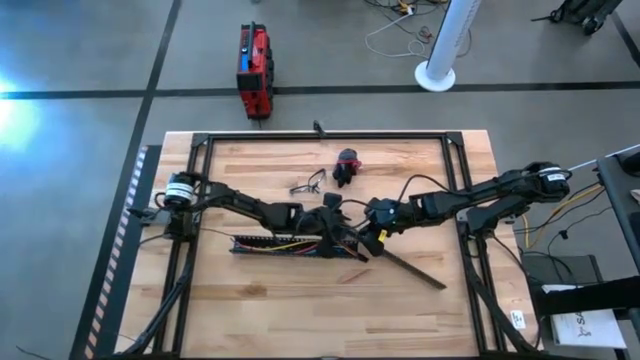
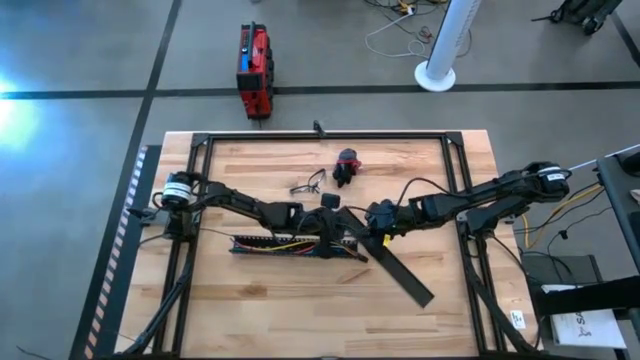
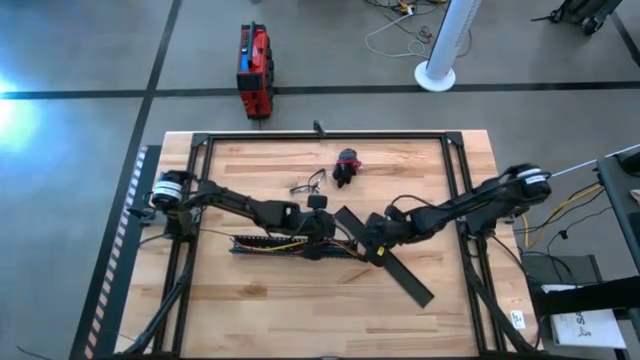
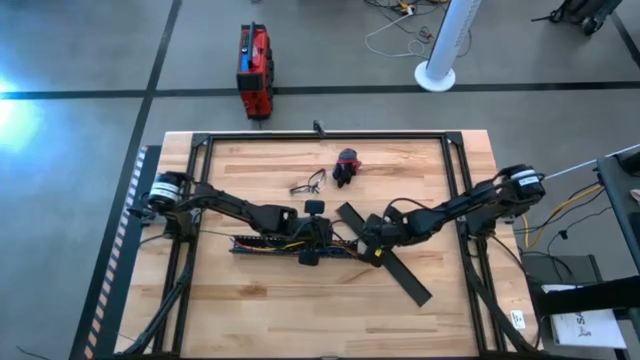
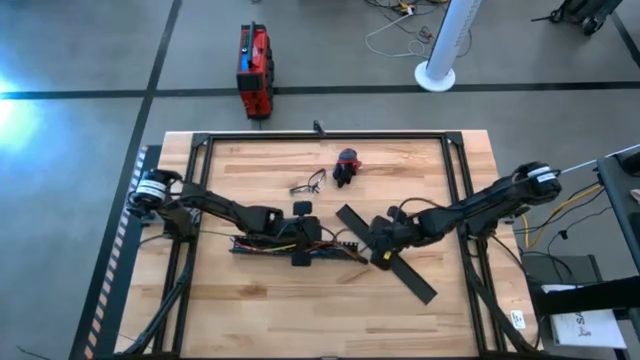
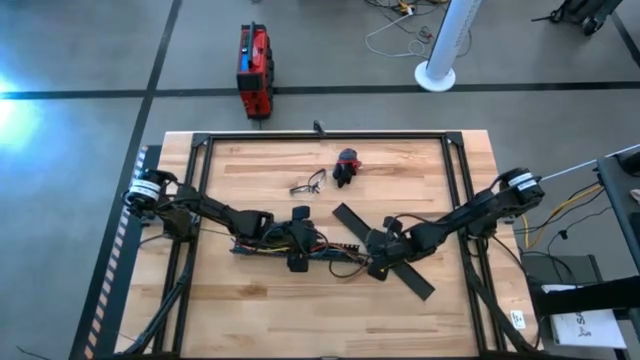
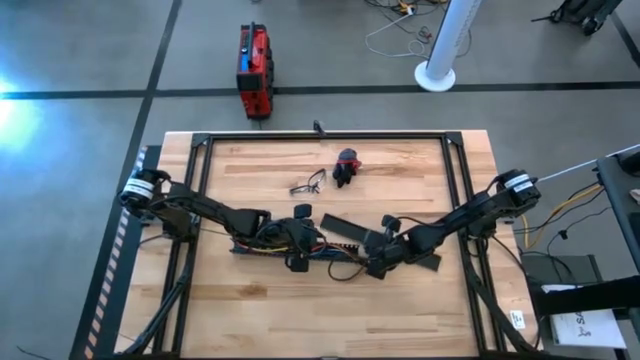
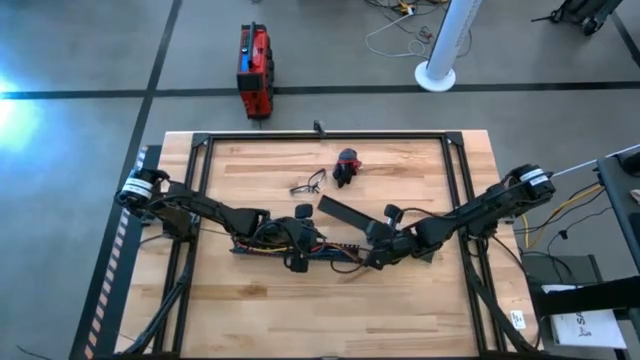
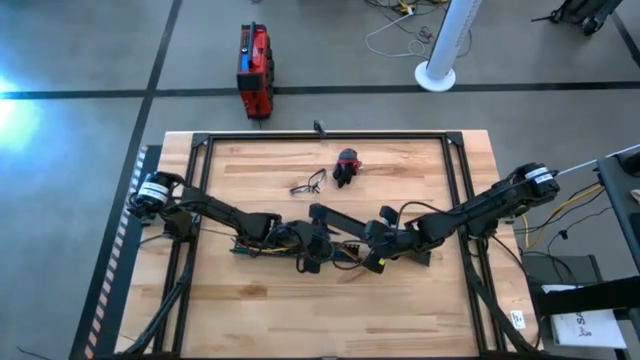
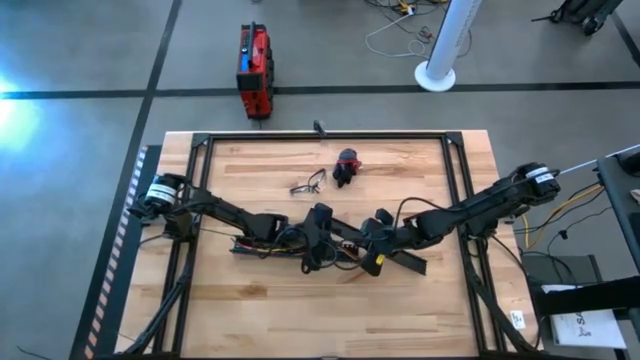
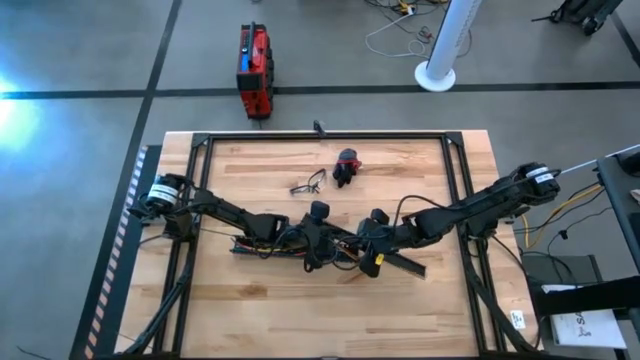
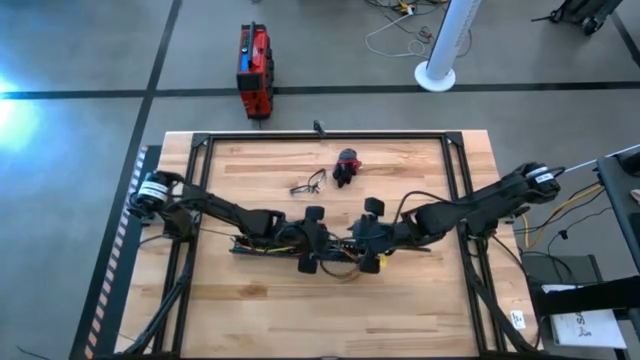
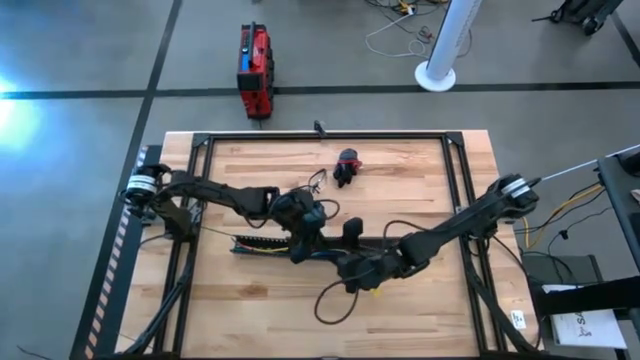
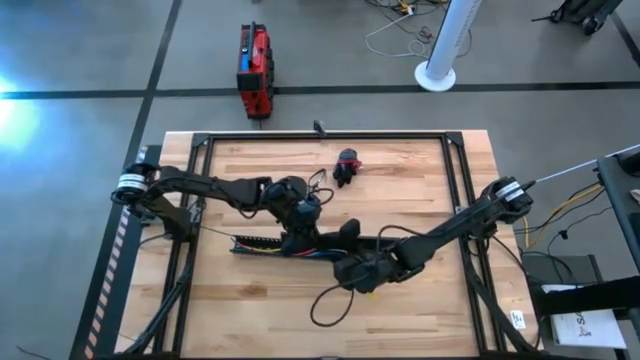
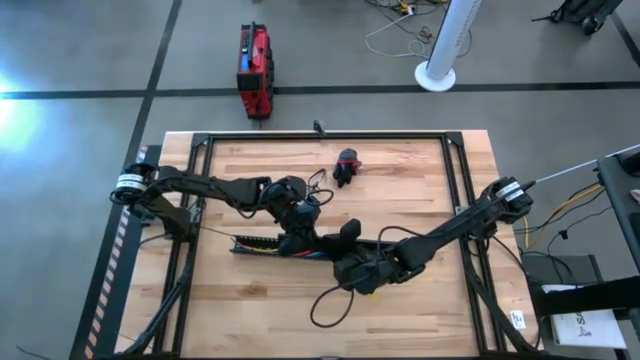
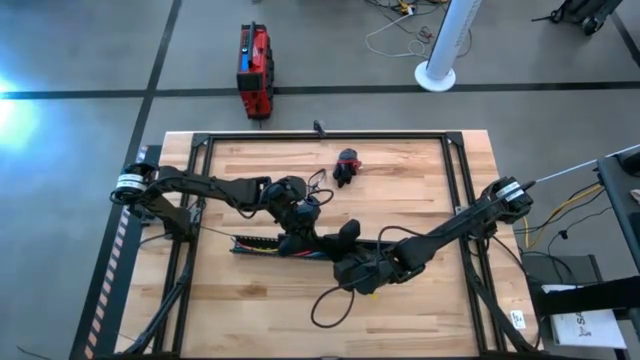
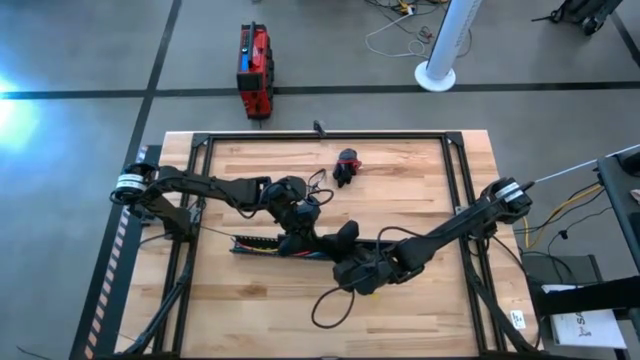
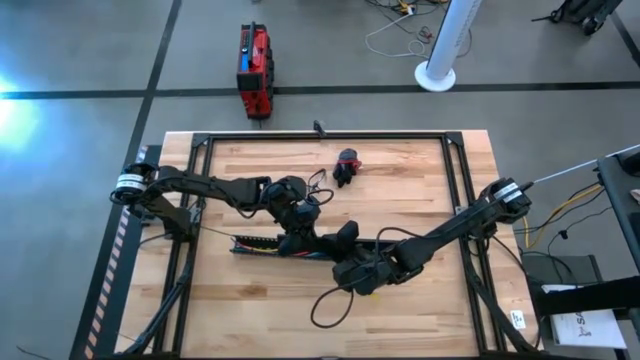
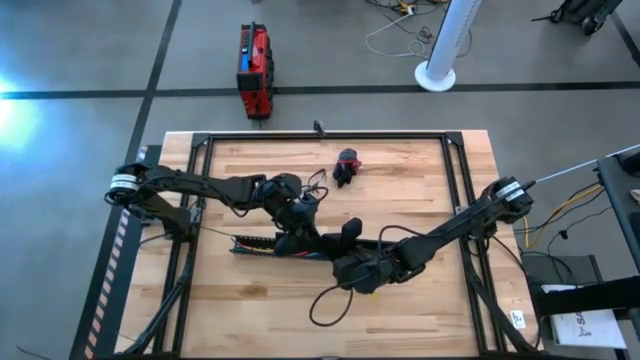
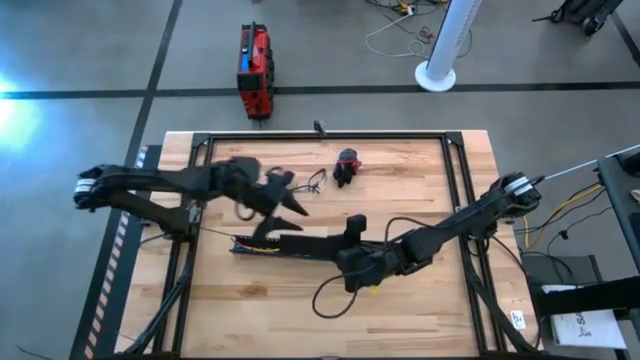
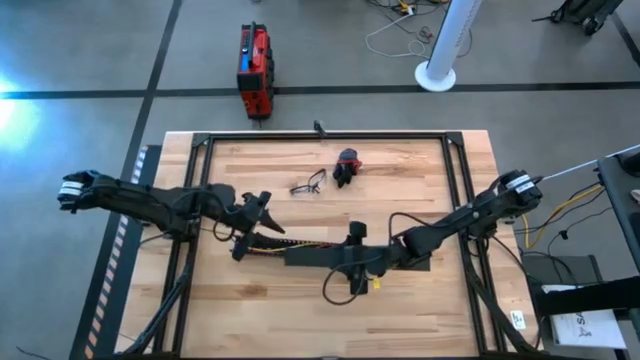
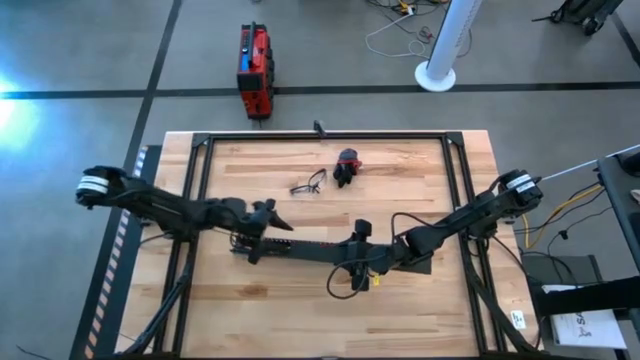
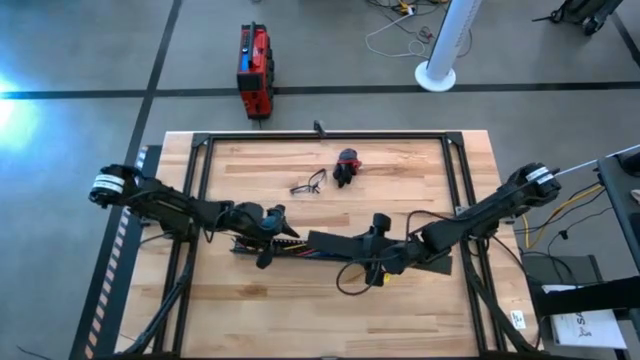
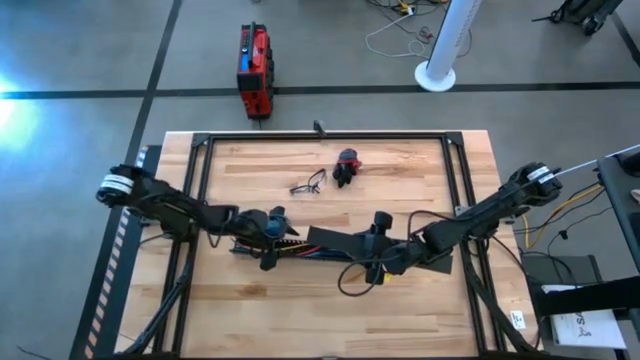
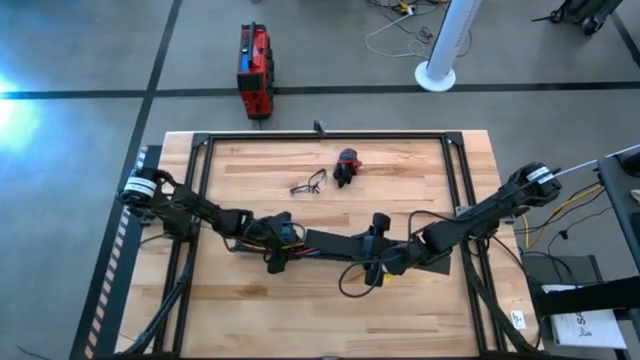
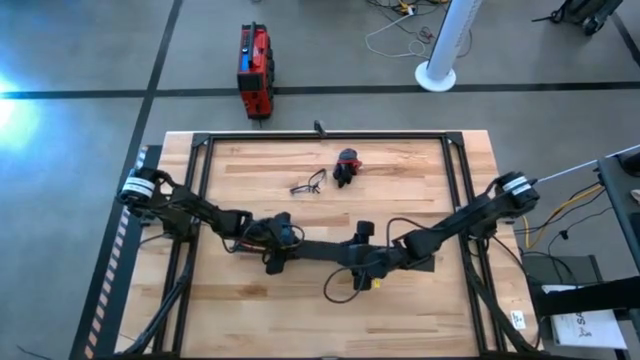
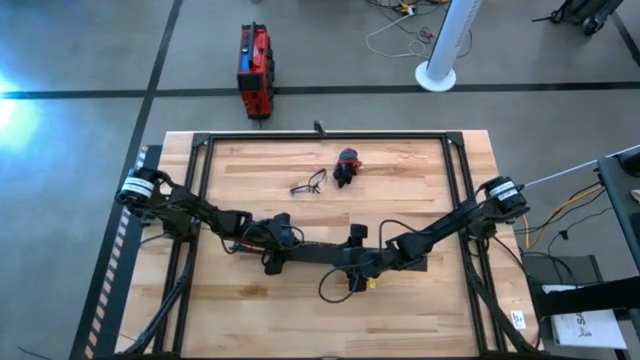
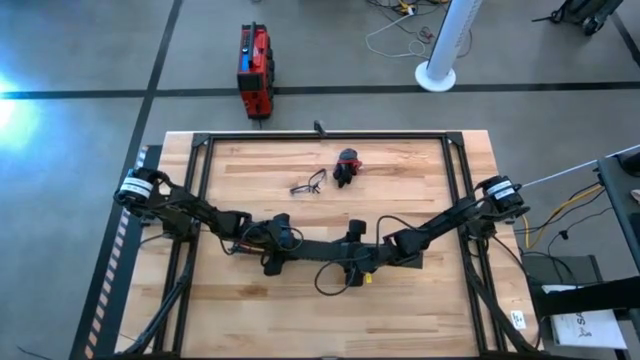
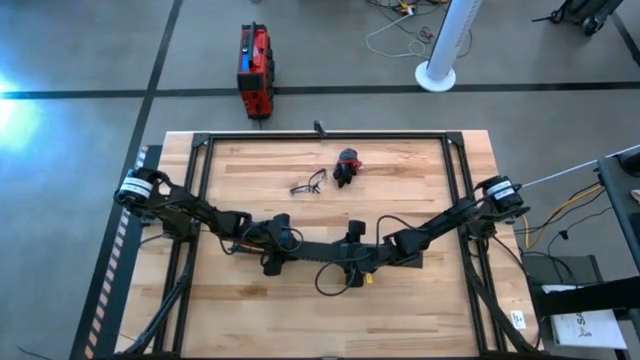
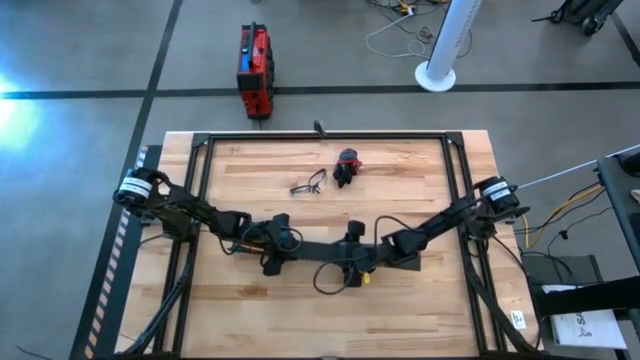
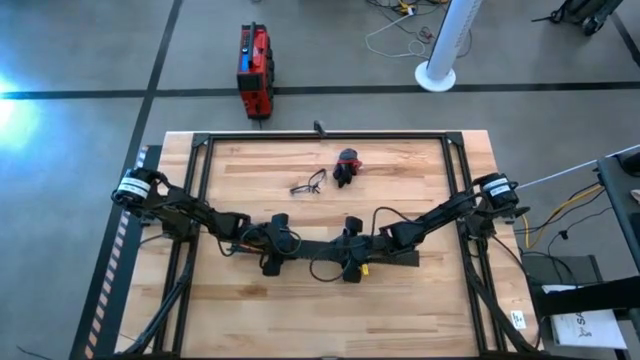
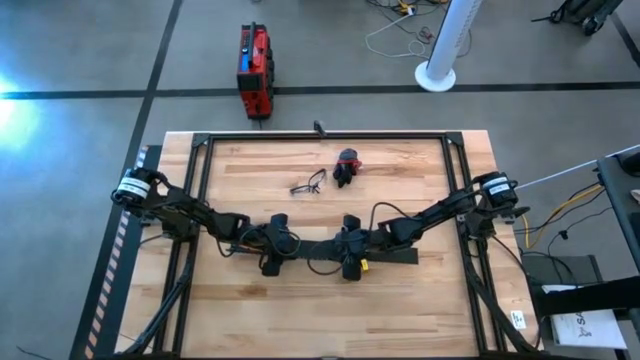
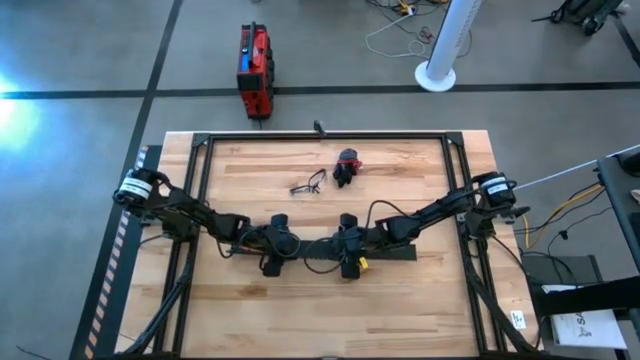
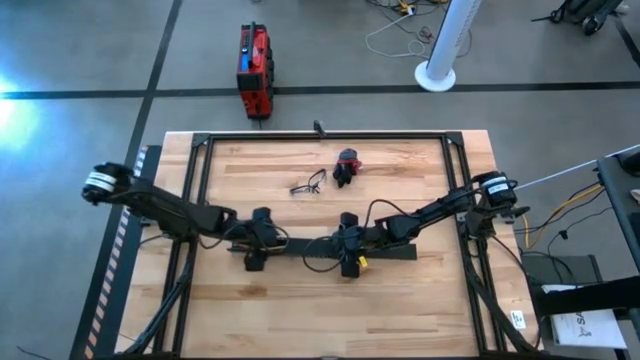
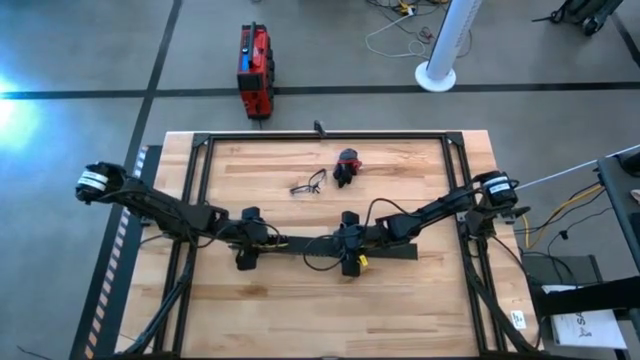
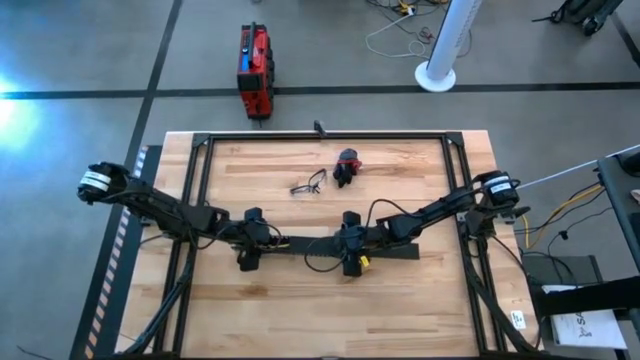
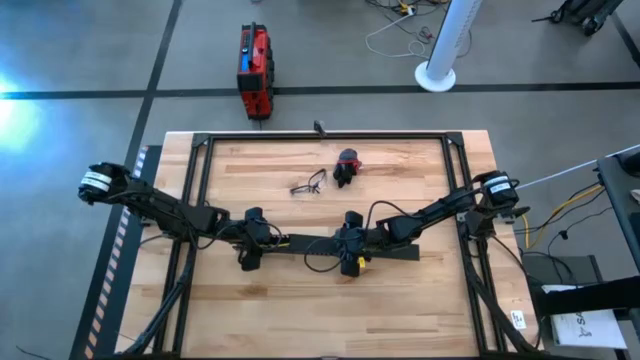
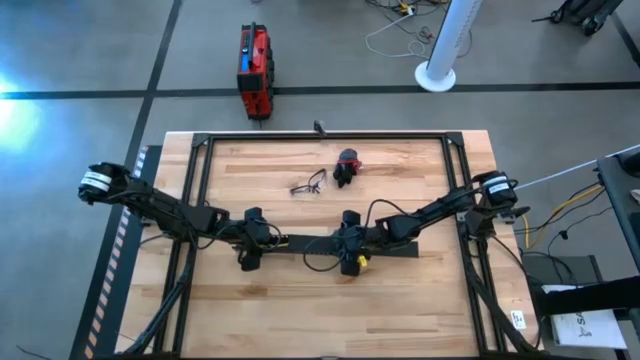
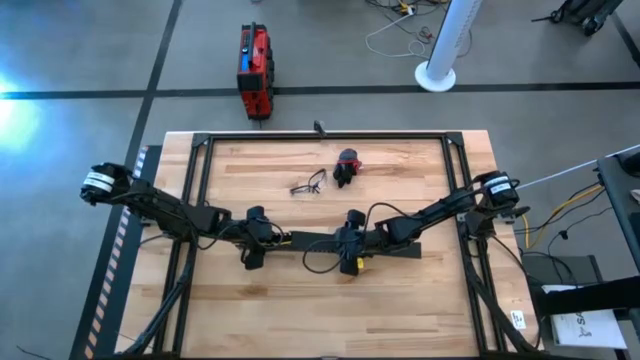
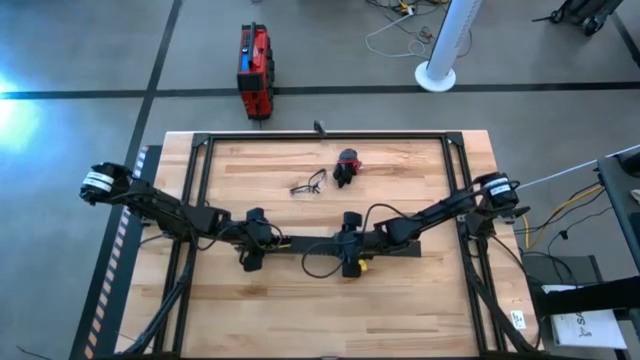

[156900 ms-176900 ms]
Task: Ziptie cables
Close the black cable duct lid

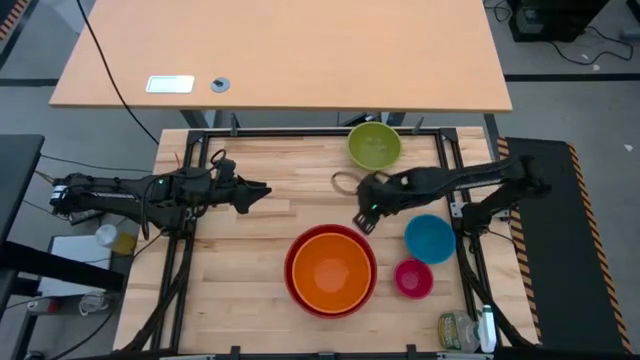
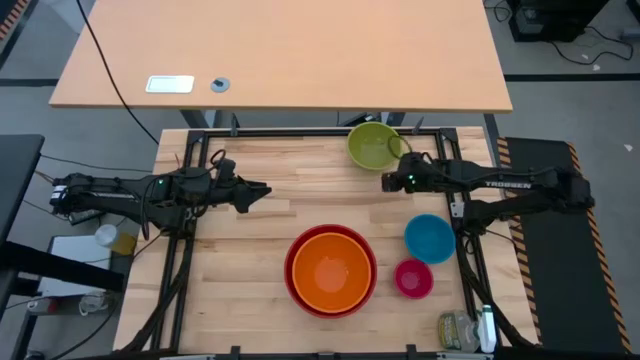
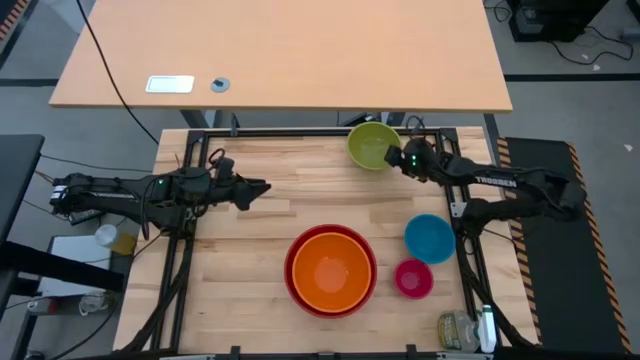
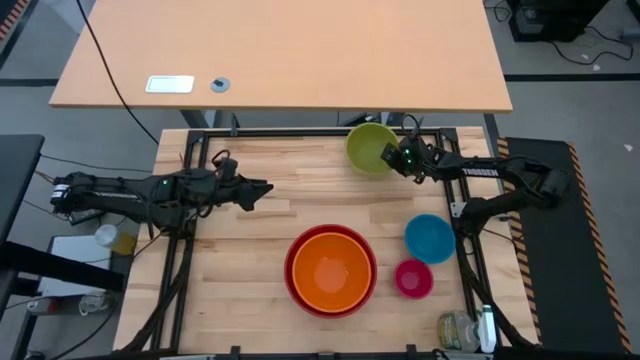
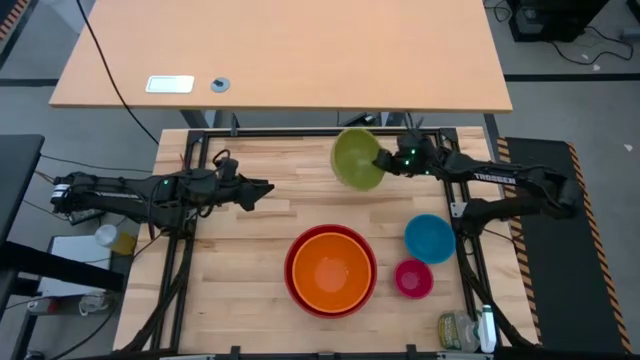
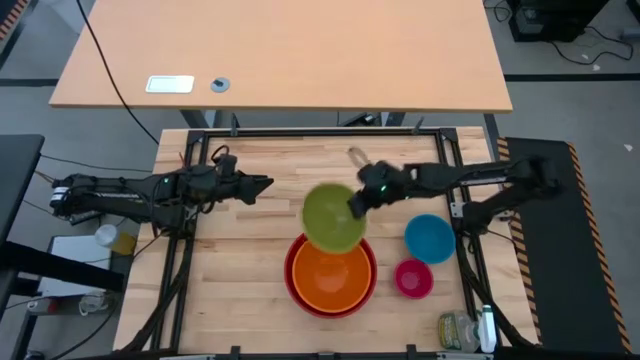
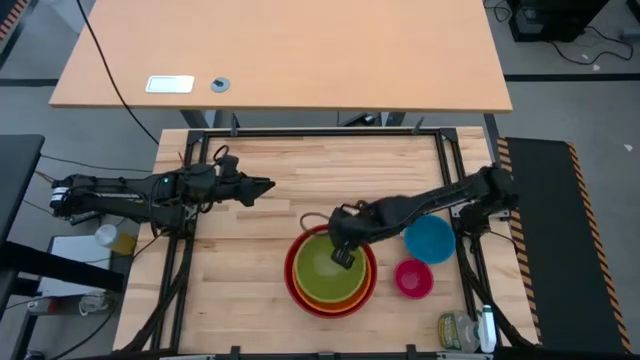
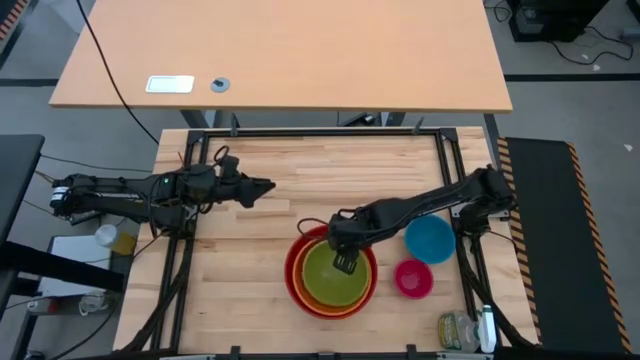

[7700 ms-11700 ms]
Task: Nest bowls inside each other by size order
Stack the green bowl on top of the orange bowl
